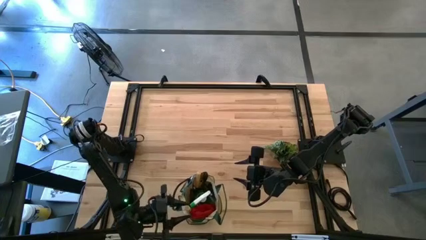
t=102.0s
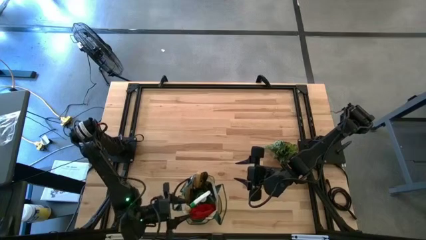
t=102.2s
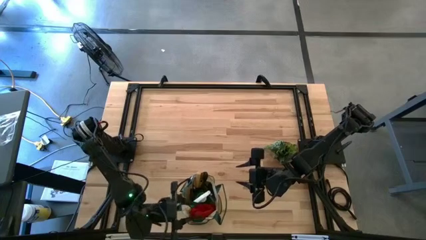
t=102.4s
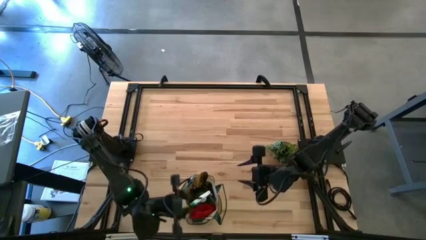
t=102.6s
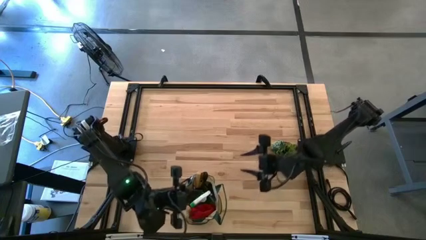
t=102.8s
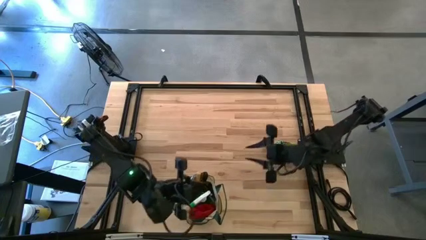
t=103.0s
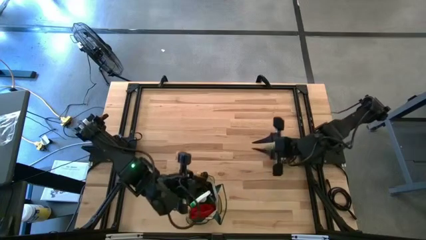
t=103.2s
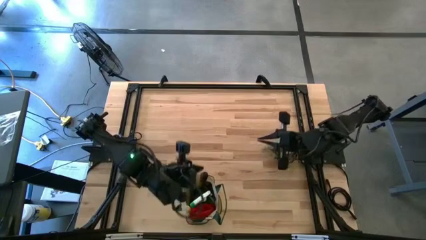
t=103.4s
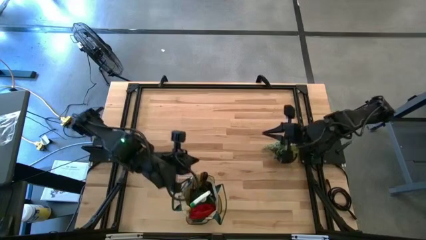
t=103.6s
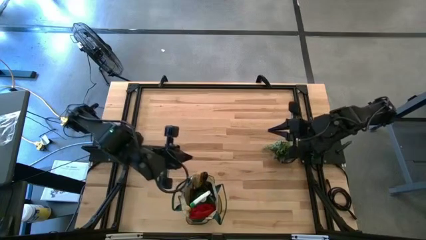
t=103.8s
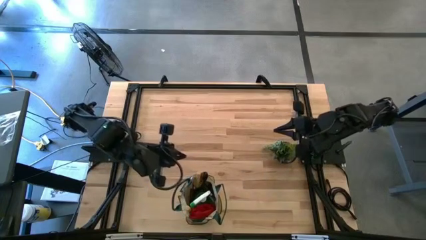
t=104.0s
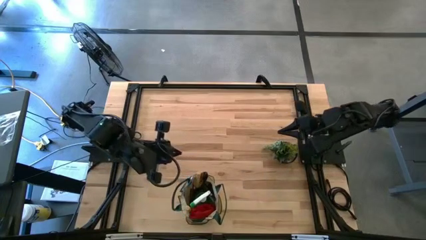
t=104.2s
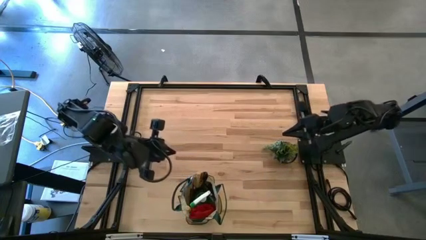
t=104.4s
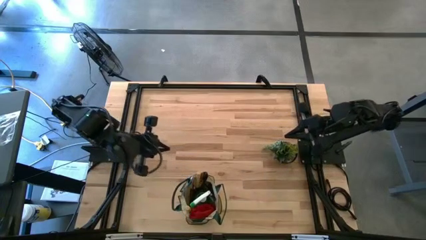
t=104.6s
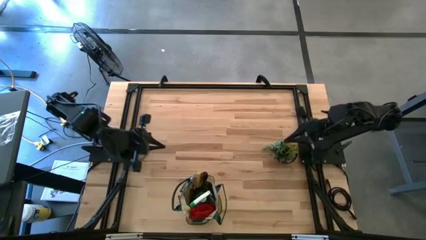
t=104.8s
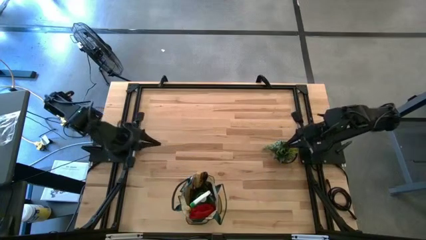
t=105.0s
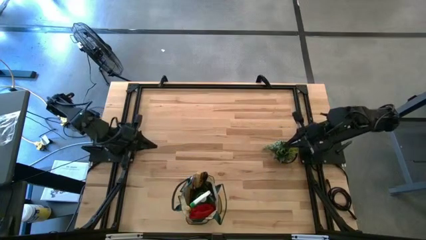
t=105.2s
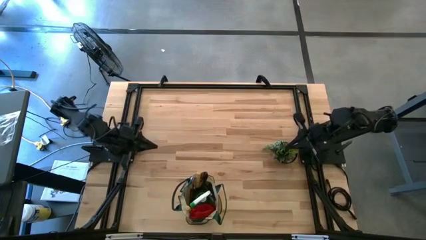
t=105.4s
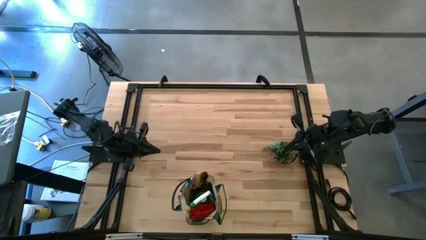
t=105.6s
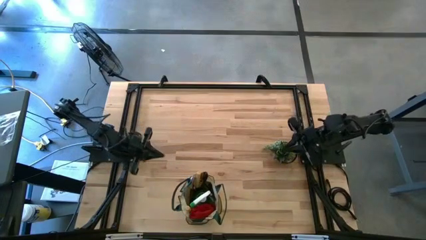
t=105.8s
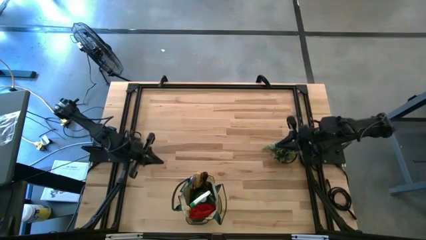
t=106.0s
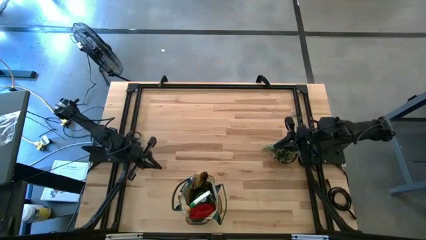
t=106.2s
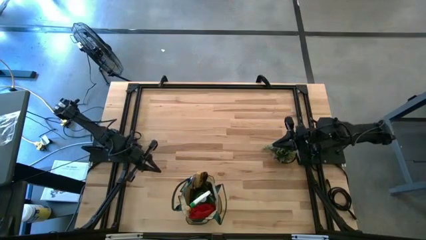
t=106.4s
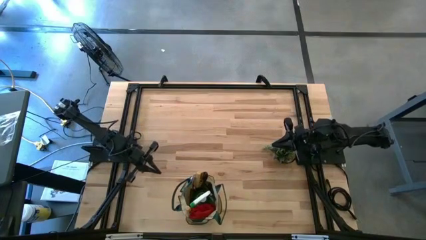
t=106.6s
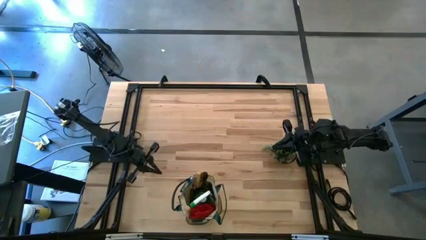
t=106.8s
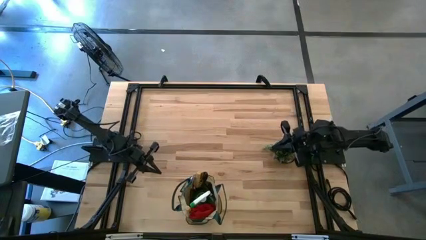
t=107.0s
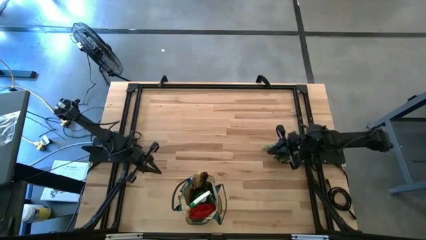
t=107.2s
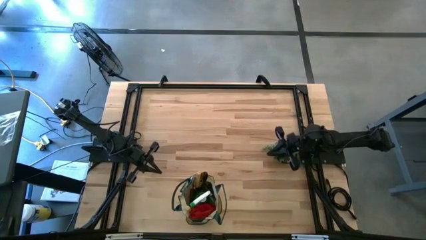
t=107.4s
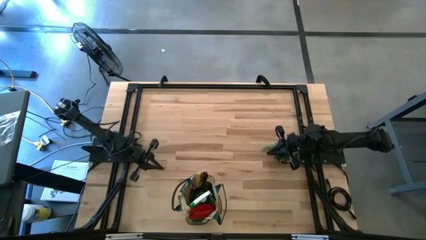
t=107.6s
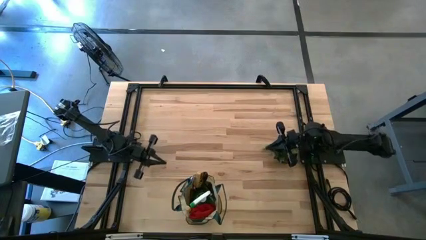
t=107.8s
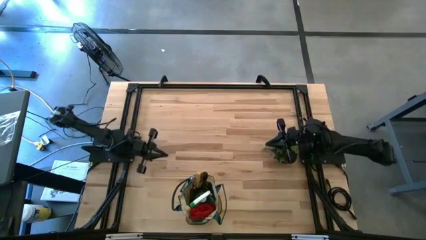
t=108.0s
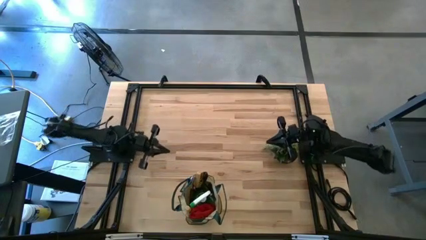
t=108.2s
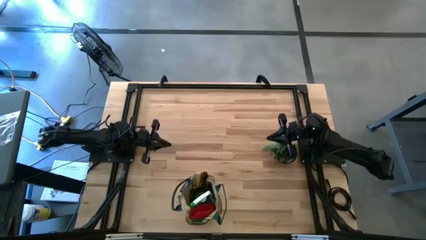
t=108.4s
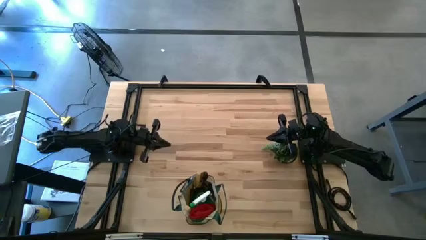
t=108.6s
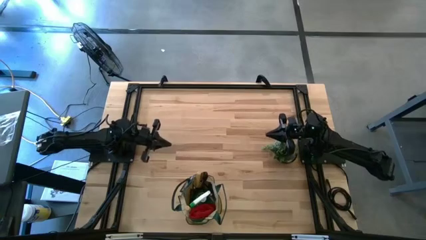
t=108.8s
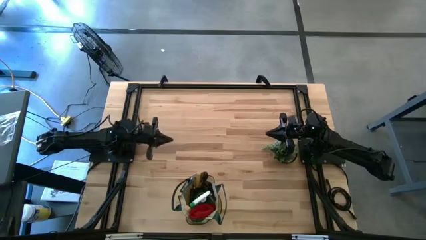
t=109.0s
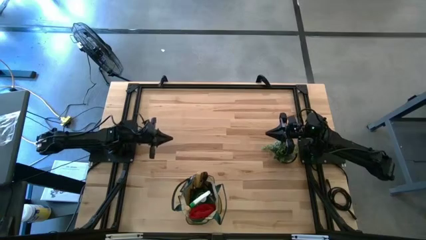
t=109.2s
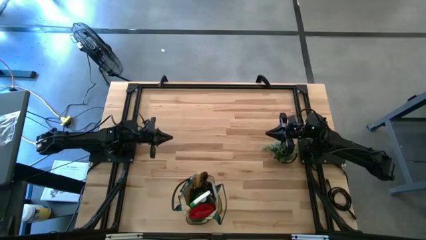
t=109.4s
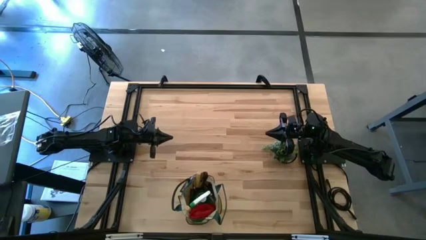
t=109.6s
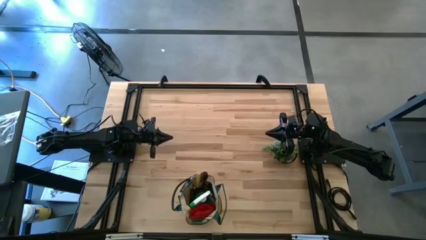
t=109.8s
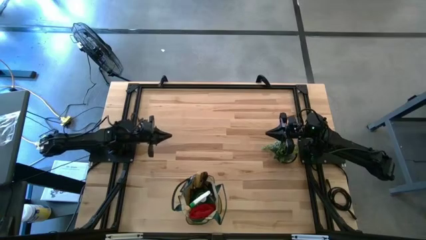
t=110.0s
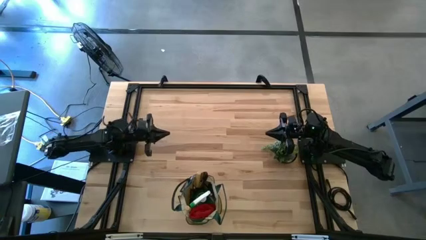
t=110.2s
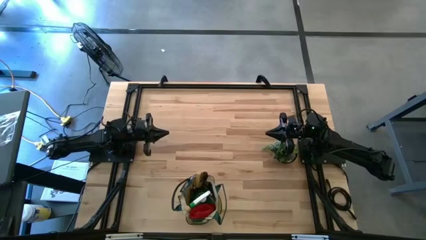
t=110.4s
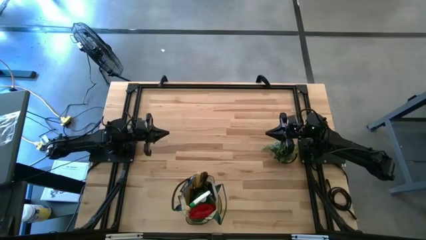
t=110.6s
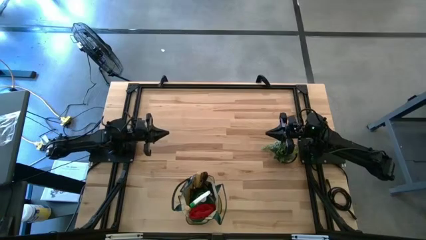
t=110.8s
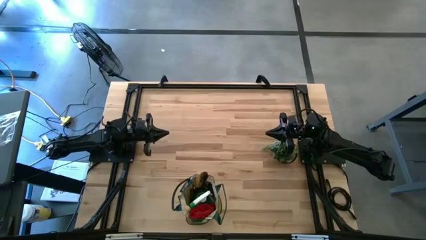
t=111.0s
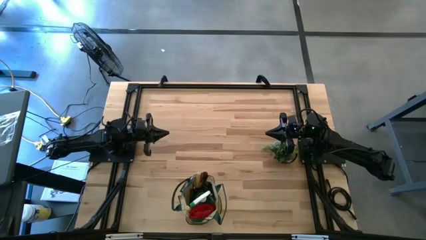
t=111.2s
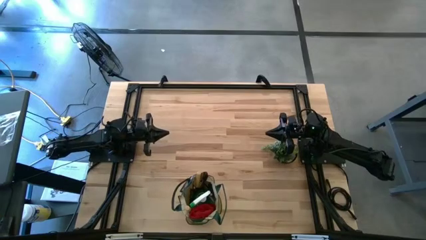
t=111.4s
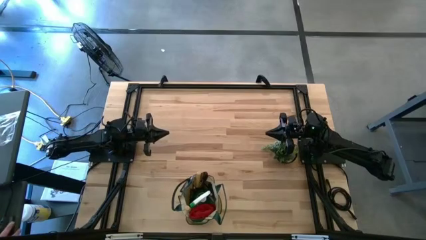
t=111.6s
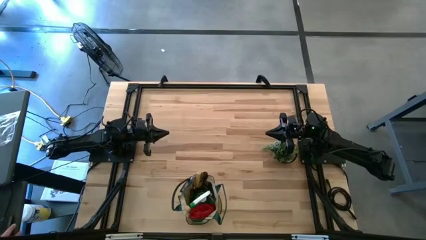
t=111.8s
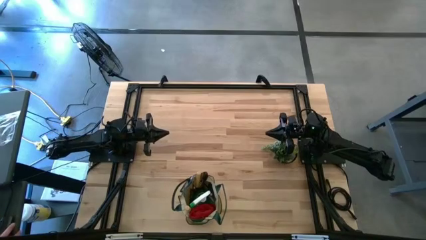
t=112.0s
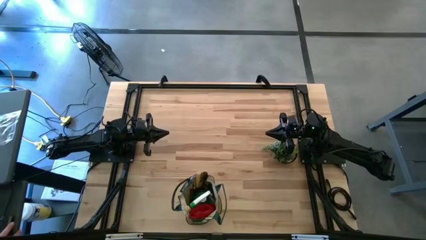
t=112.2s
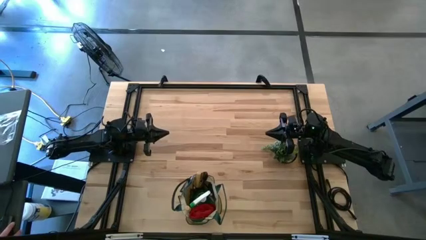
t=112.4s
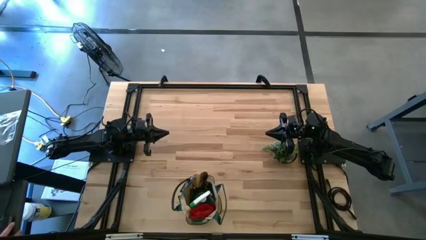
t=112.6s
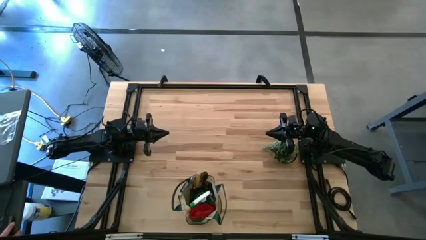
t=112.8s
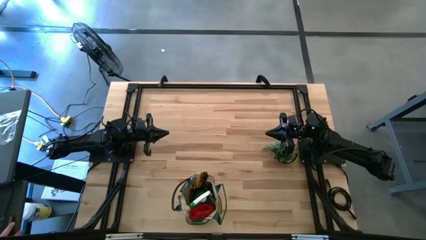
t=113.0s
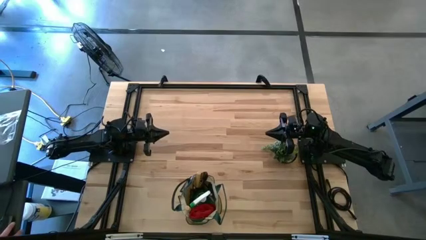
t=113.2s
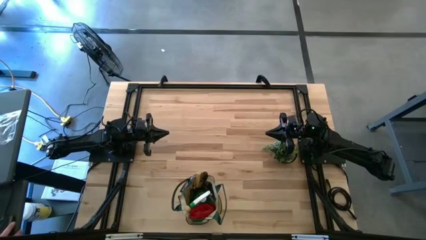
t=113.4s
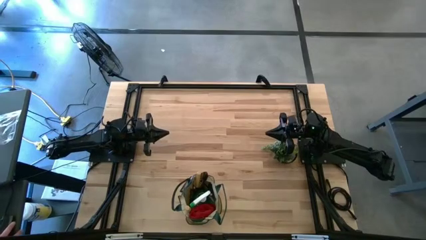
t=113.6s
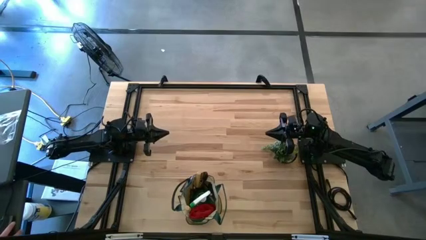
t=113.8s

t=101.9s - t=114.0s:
Task: Pick & Place Garden tools in Gardening bag
Return to Home Position

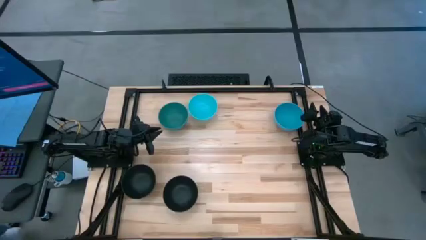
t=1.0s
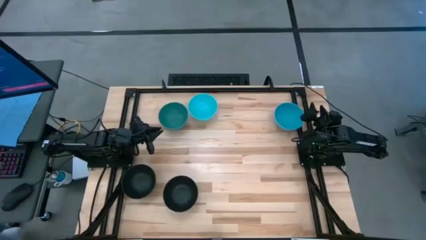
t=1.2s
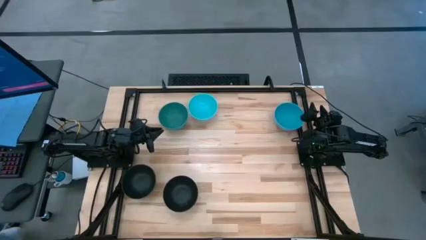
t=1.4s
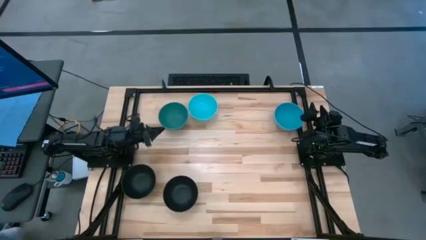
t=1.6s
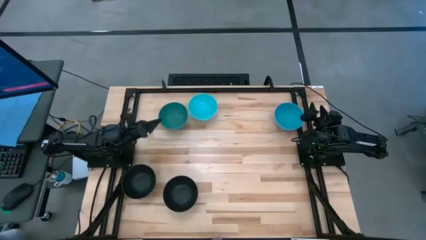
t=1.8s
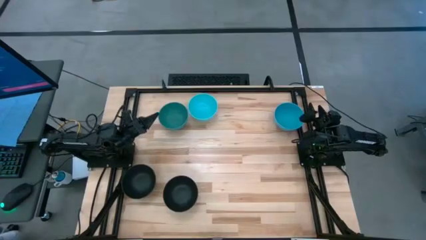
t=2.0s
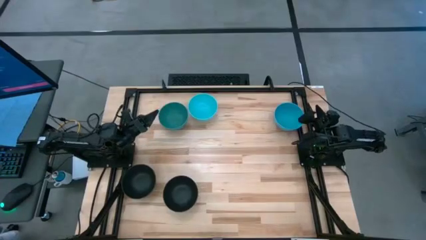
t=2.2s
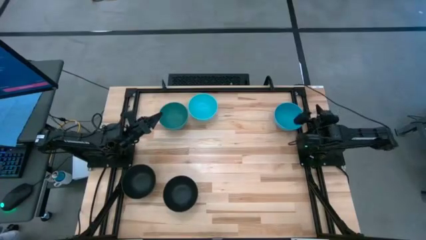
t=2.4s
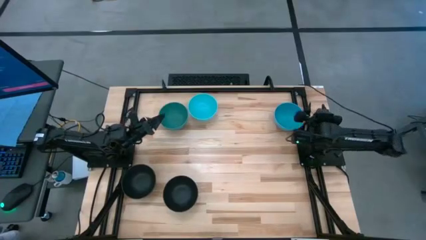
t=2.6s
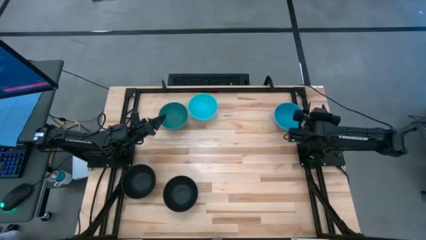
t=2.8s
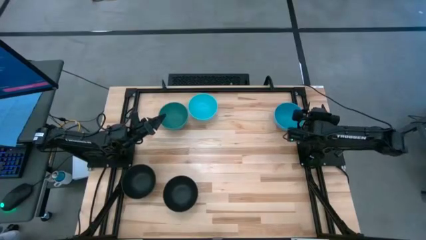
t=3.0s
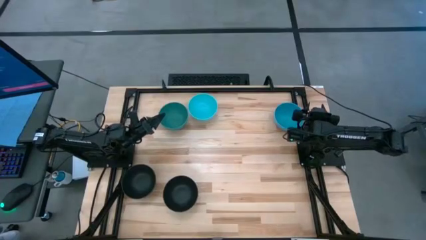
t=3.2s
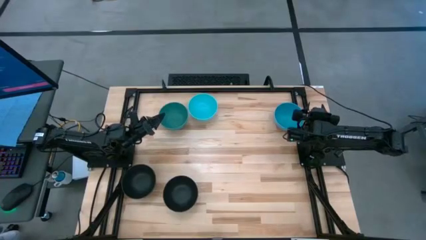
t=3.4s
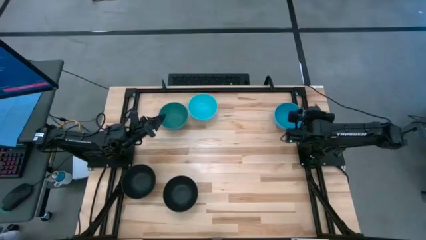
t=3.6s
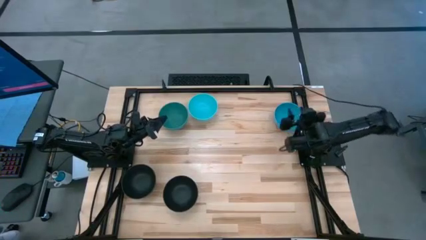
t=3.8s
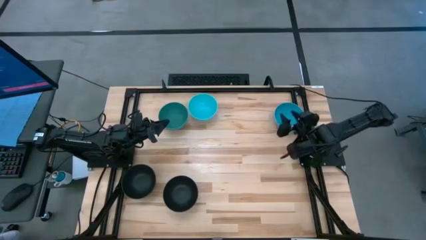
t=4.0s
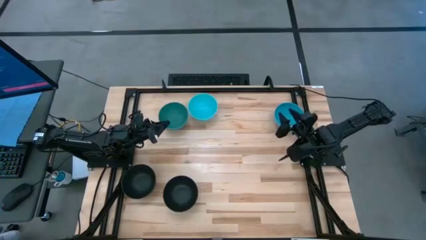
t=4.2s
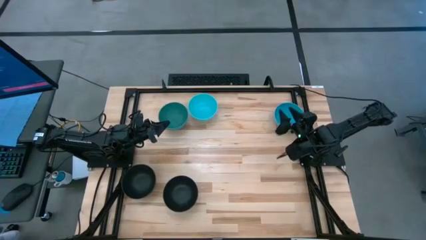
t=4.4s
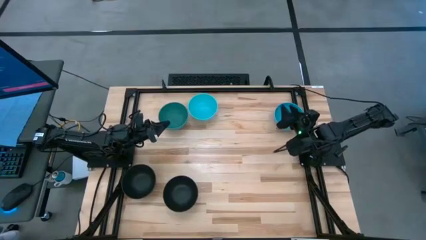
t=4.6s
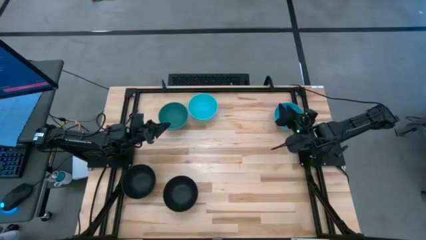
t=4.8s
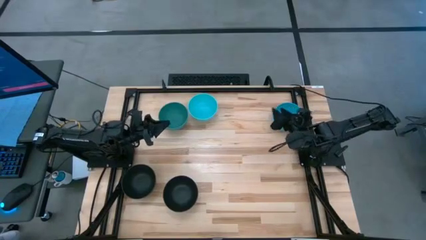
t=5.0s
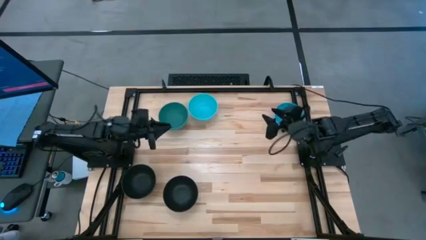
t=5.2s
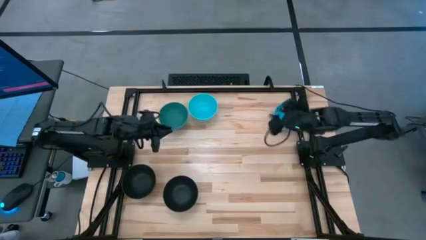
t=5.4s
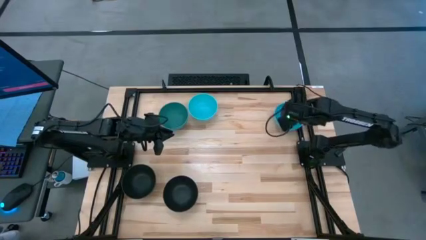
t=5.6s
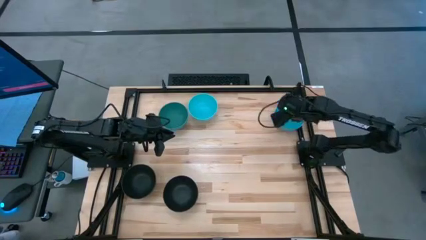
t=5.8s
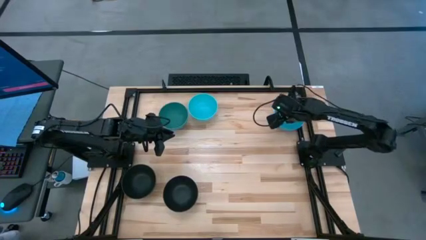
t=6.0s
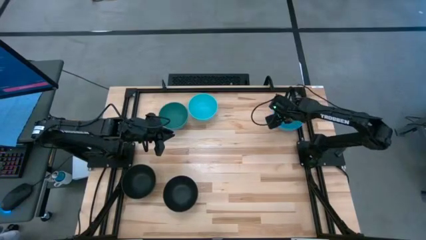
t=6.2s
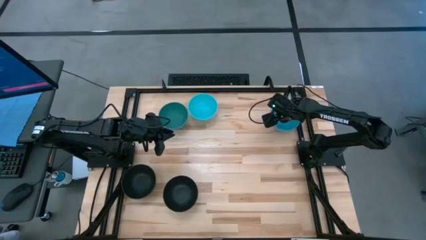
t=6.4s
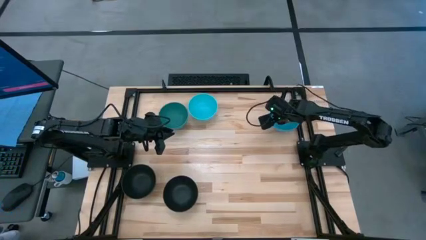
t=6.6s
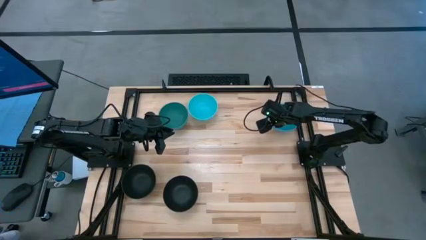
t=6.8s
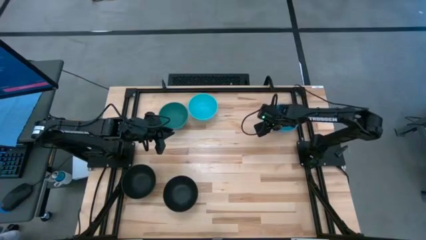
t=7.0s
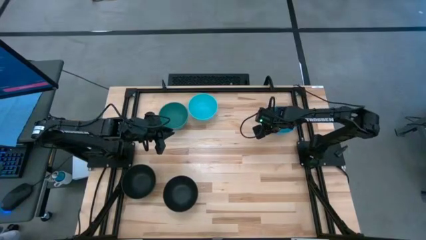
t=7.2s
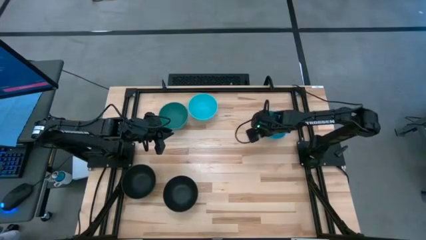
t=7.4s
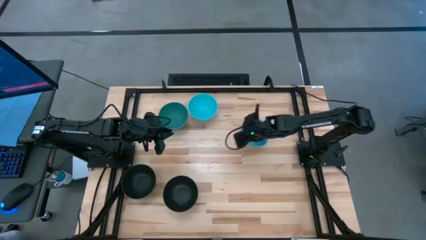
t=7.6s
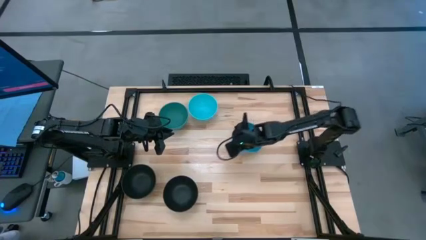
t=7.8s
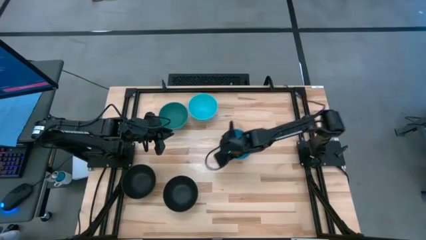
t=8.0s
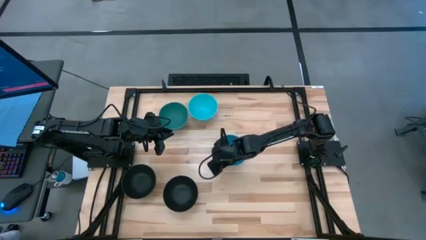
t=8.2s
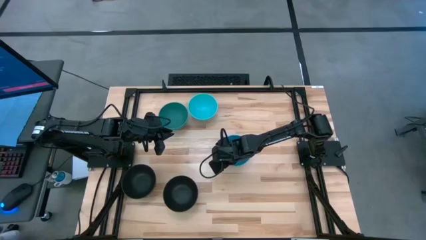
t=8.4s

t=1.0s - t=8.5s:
Task: Nest bowls inside each other
Move the blue bowl to the middle of the table
